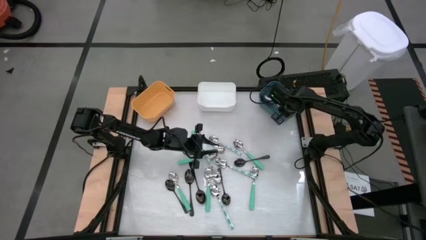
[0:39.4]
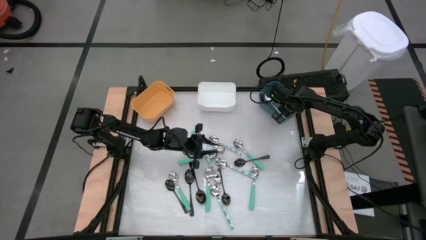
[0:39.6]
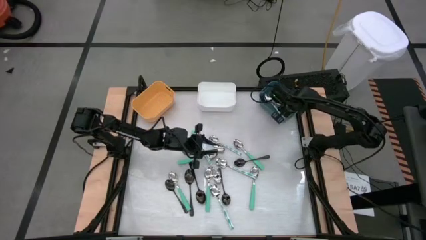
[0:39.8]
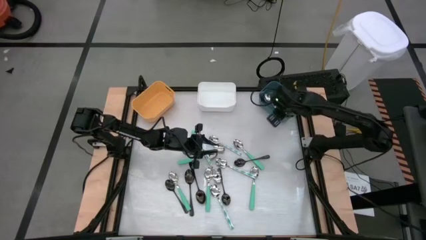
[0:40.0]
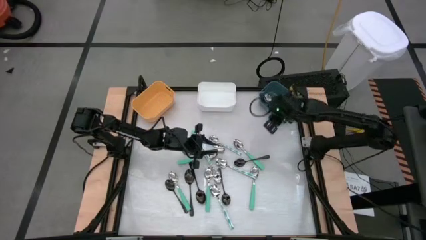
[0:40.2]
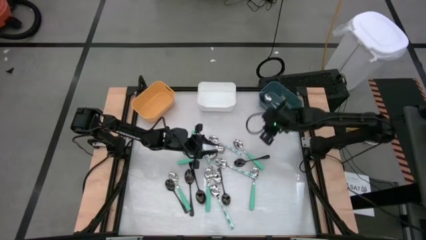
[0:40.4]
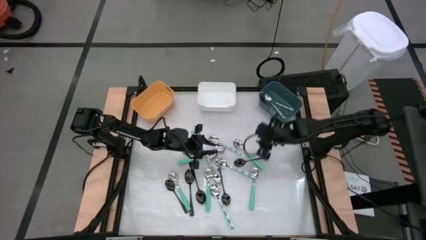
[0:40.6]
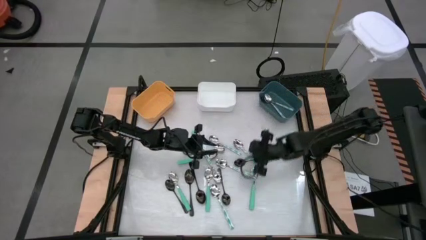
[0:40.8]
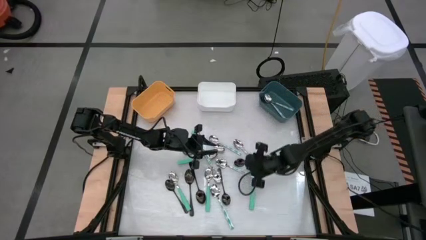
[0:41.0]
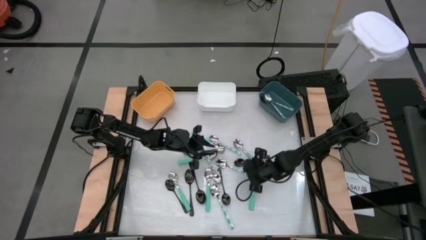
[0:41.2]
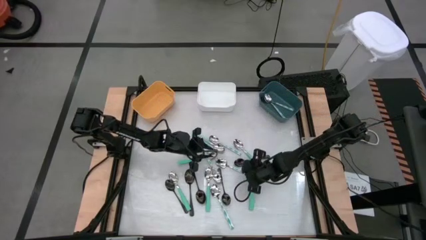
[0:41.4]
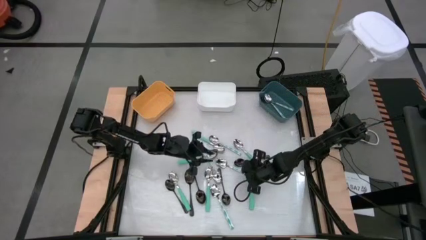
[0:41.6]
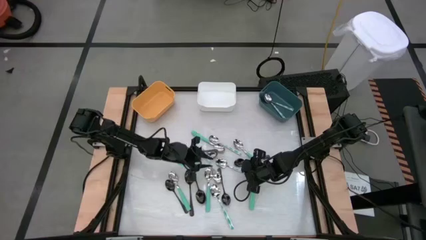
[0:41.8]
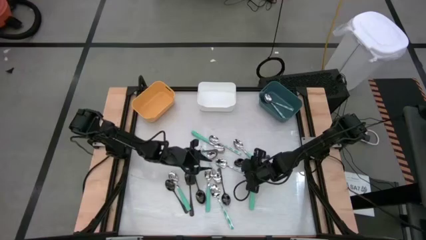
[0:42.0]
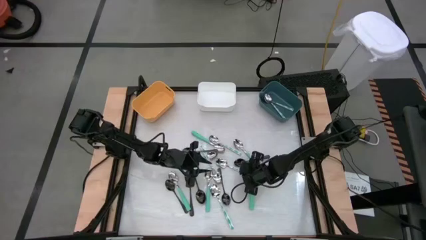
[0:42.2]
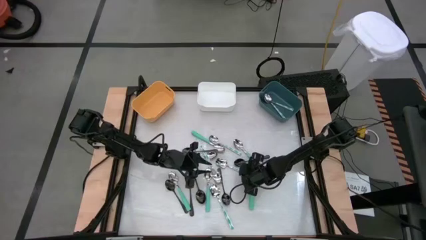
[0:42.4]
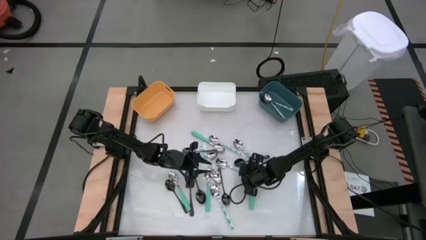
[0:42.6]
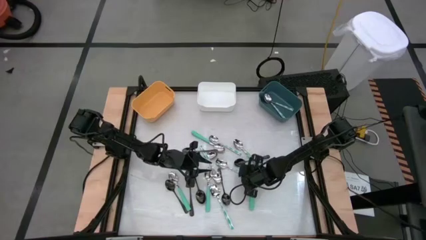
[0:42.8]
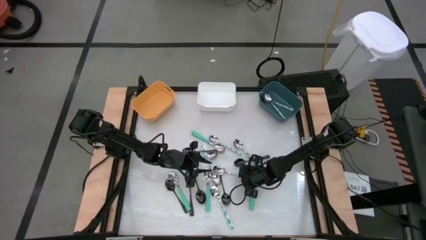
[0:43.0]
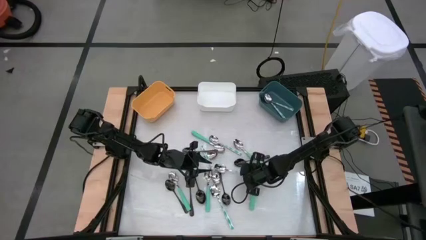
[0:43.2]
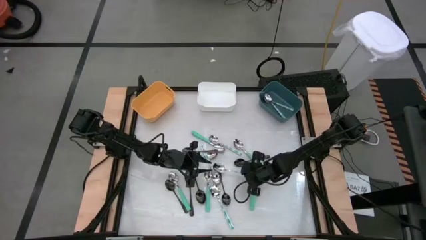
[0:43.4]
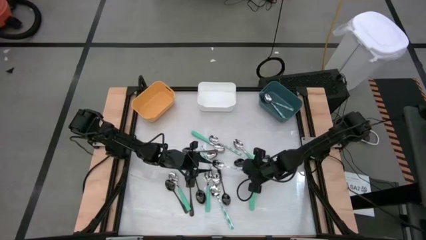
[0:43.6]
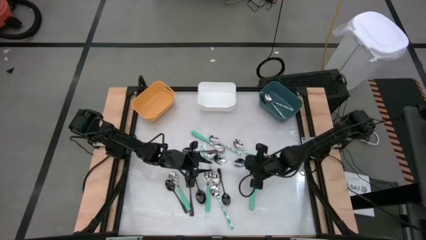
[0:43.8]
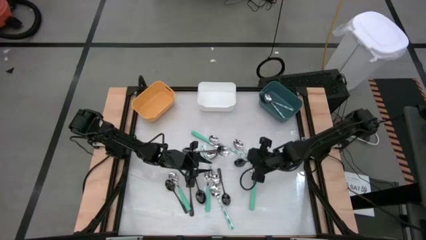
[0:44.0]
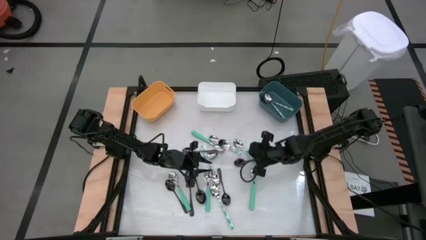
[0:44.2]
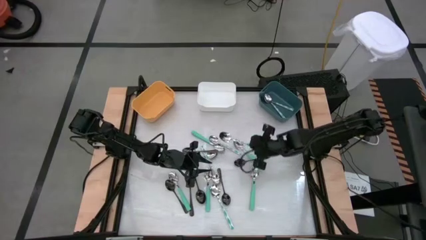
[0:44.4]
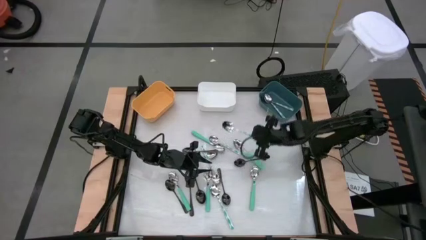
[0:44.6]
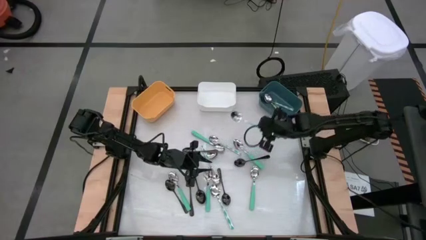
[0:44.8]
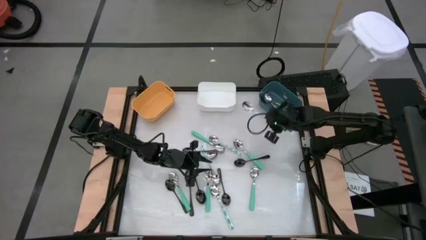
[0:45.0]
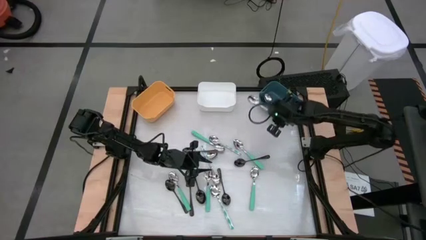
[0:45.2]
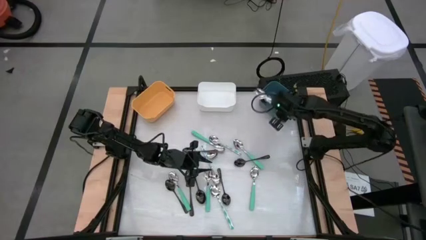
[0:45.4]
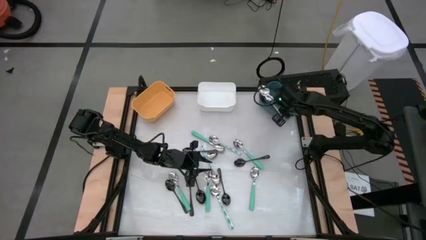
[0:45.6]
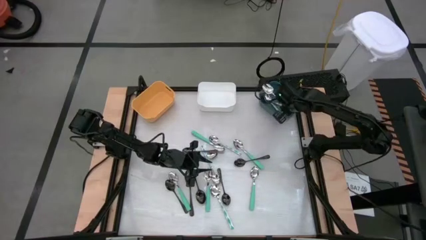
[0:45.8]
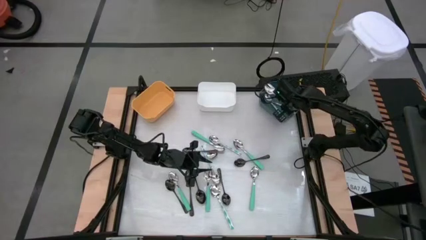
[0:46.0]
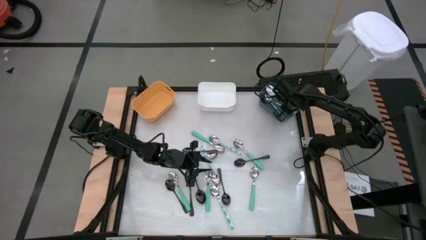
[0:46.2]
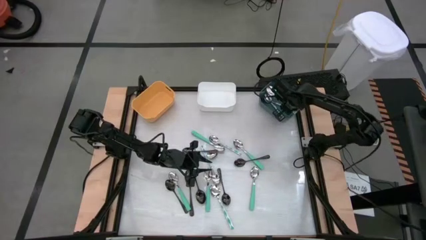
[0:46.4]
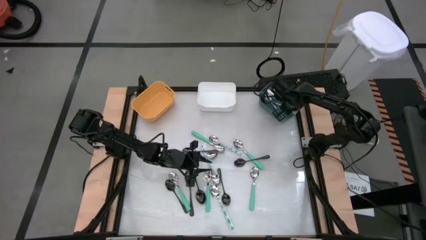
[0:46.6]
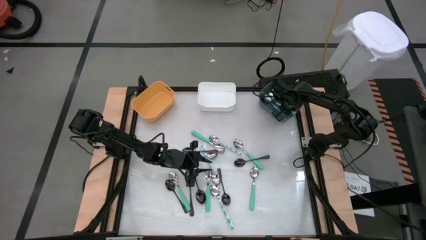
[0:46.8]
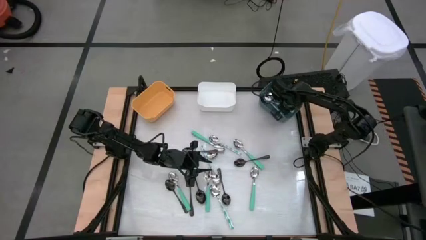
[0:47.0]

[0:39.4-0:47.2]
Task: Sort silverware by color (type)
Put the blue patterned spoon into the blue bin

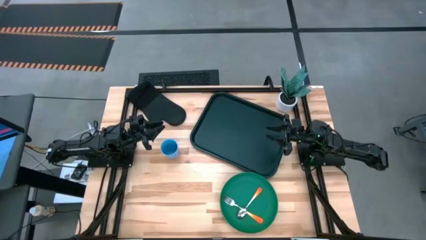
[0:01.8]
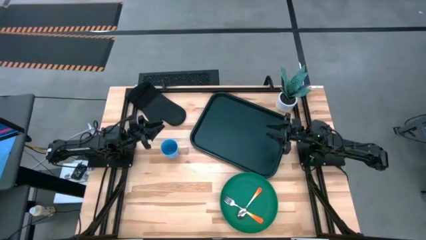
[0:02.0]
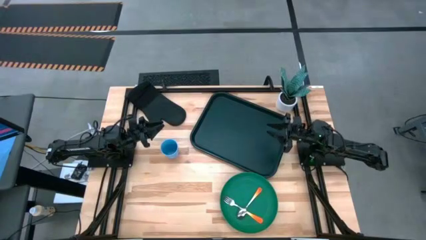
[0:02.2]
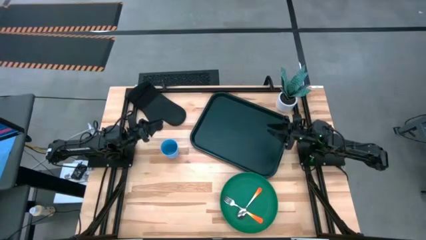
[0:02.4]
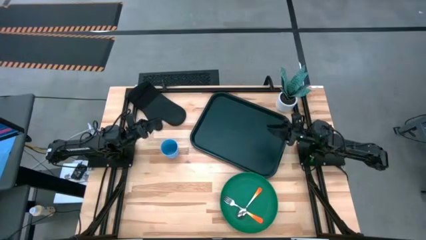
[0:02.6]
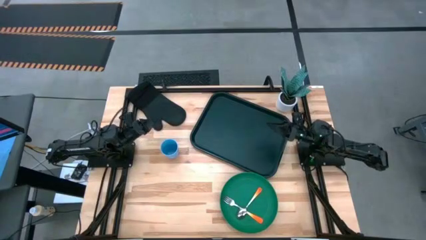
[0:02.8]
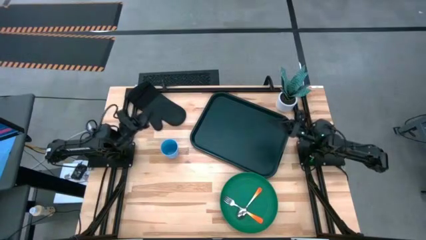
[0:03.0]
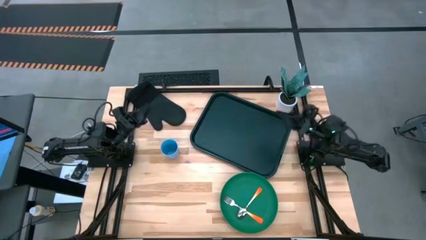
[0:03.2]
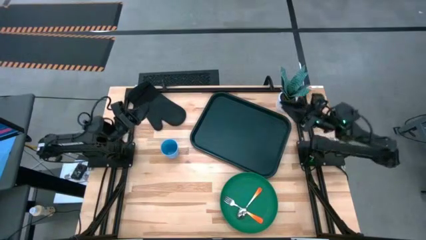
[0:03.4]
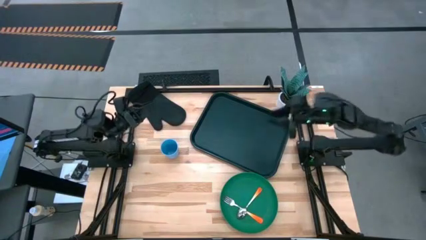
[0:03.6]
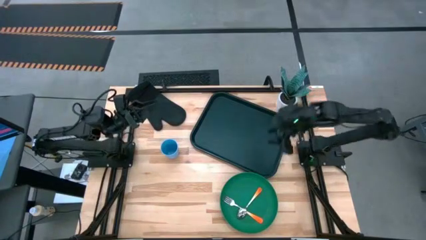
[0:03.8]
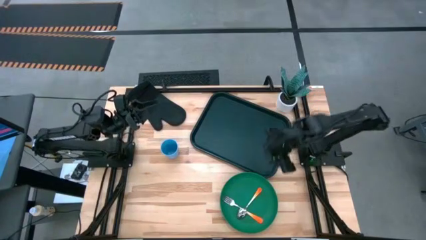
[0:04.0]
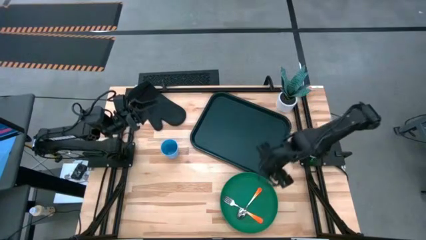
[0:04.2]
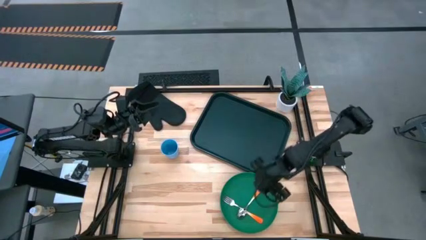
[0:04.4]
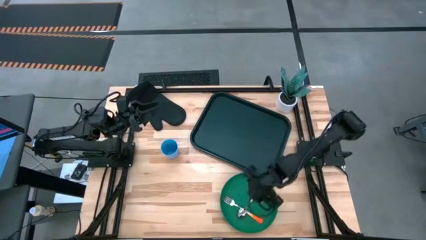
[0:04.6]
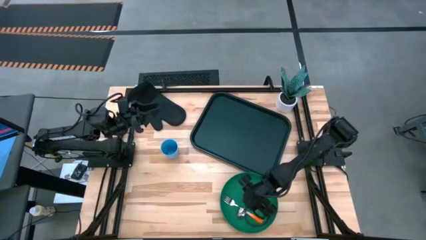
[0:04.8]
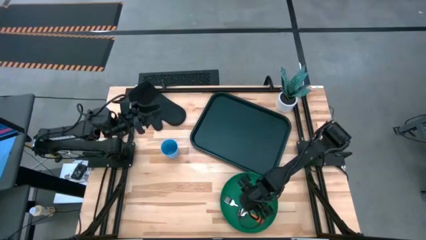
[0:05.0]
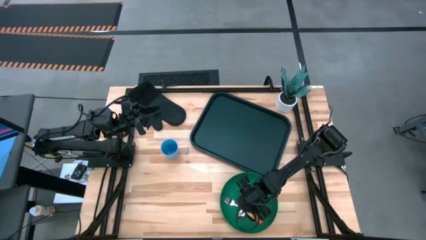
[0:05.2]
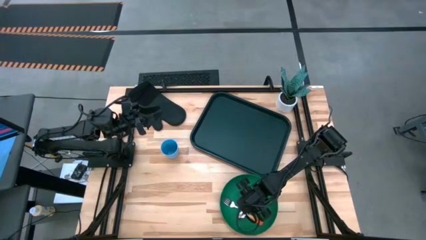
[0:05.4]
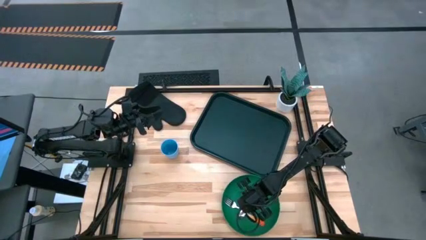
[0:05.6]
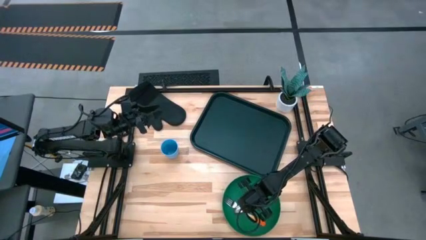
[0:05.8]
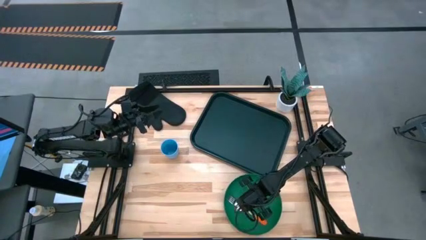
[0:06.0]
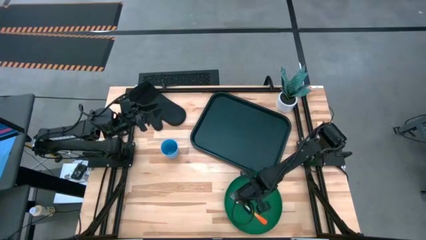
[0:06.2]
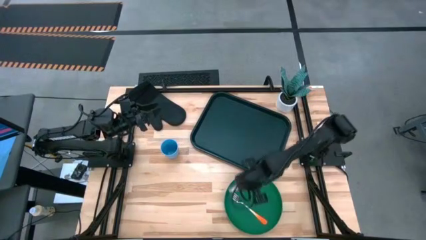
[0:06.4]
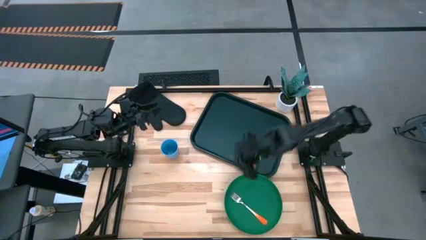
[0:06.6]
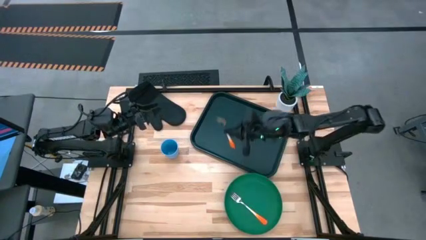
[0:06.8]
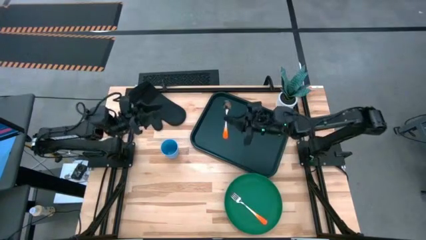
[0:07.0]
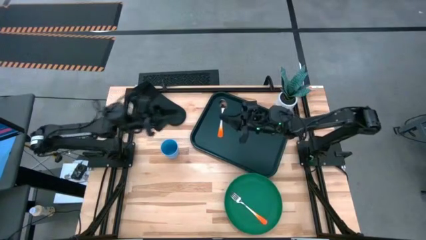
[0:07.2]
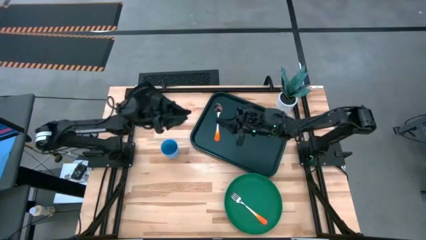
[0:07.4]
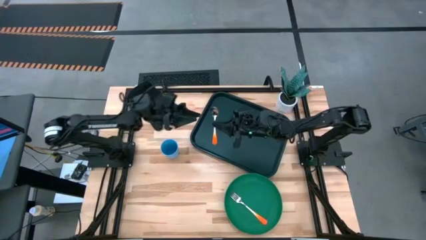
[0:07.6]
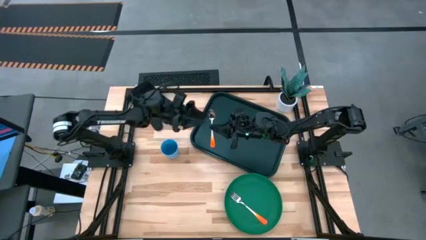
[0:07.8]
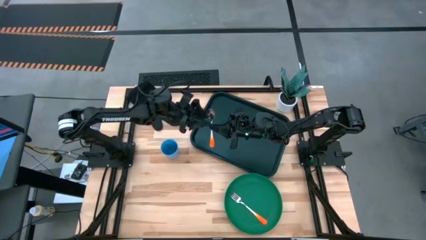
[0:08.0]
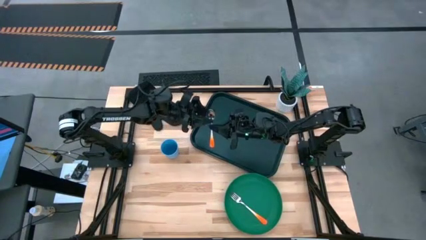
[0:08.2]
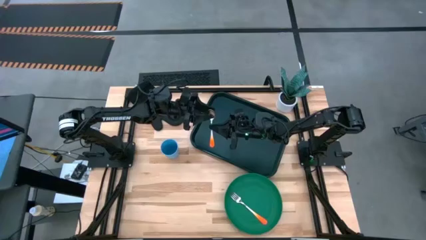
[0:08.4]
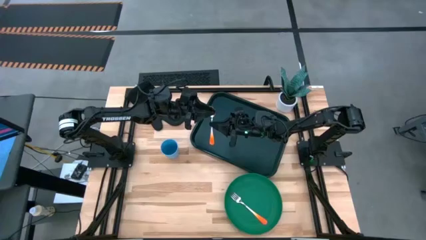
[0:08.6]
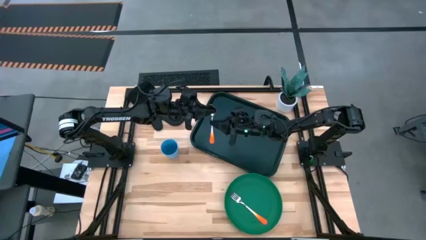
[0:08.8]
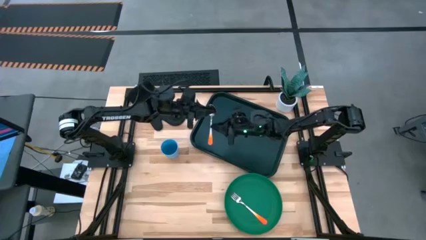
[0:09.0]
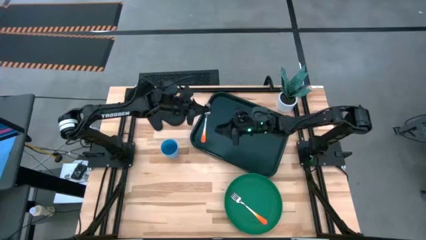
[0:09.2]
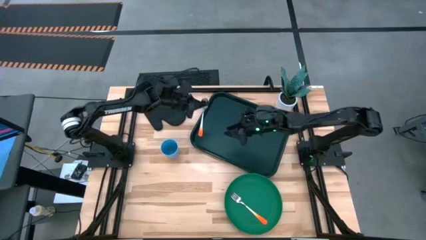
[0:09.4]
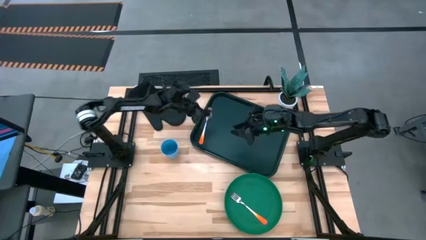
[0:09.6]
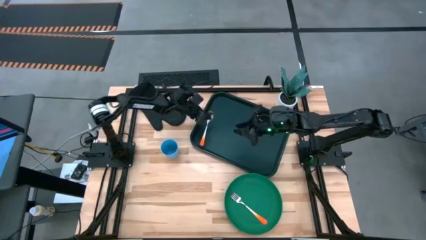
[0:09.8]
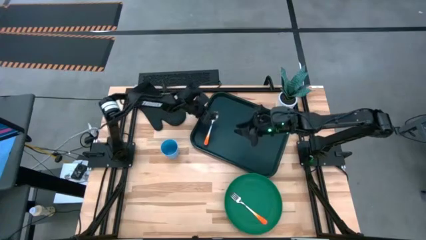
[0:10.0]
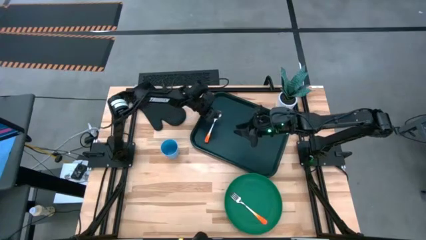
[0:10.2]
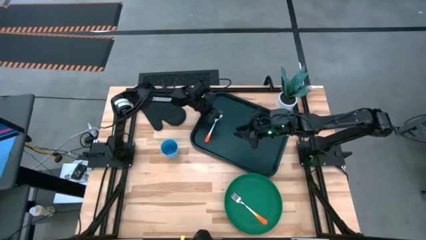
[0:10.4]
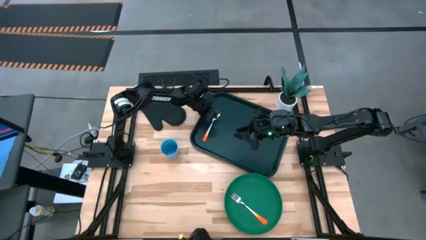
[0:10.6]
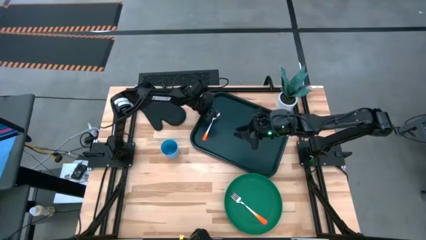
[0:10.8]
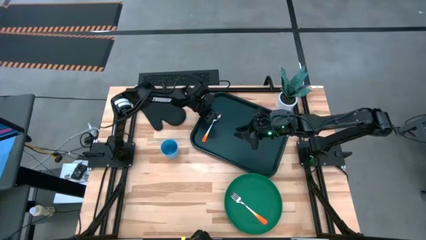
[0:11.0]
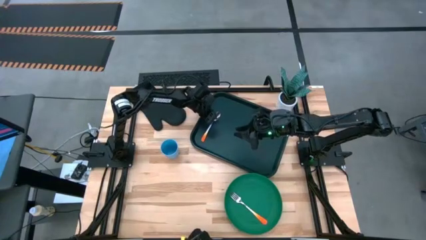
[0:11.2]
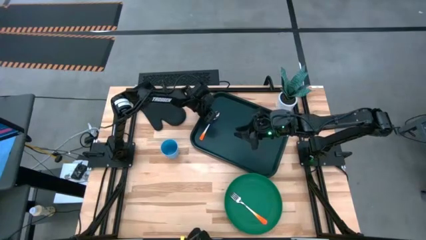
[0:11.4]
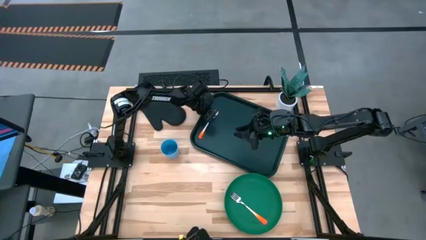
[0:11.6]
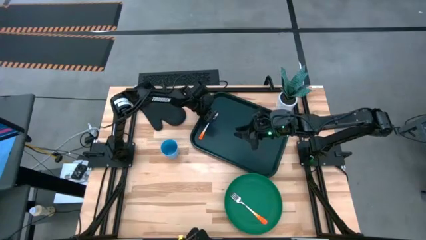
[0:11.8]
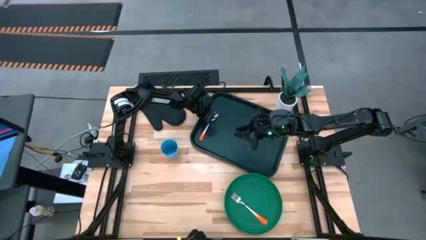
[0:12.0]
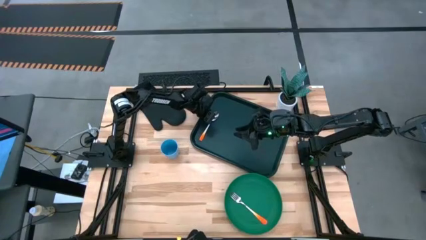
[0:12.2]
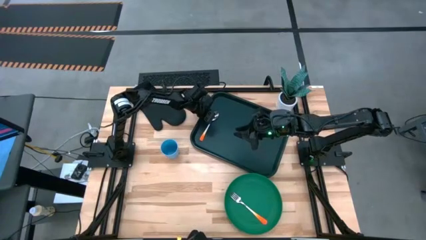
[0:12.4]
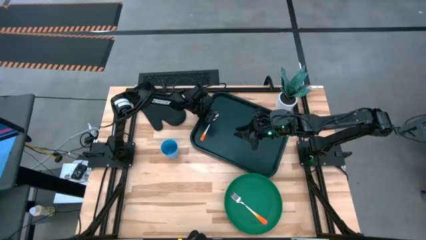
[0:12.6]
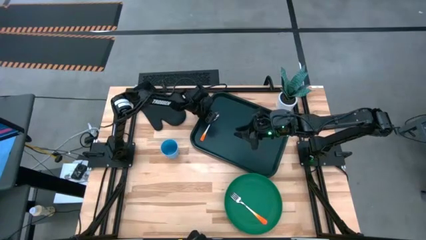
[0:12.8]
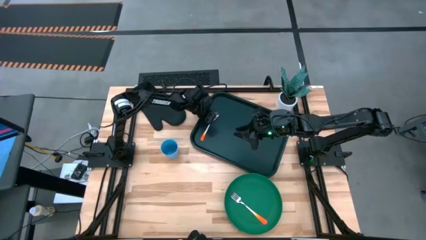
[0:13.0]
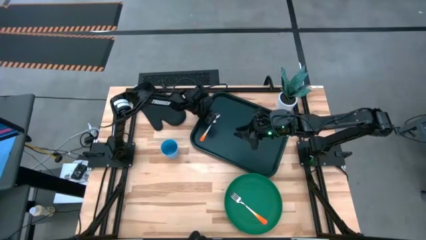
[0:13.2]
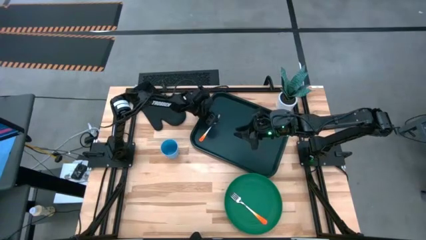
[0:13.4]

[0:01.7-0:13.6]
Task: Pick and place plate/cup/fork/spoon on tray
Put the orange spoon on the bottom left of the black serving tray
